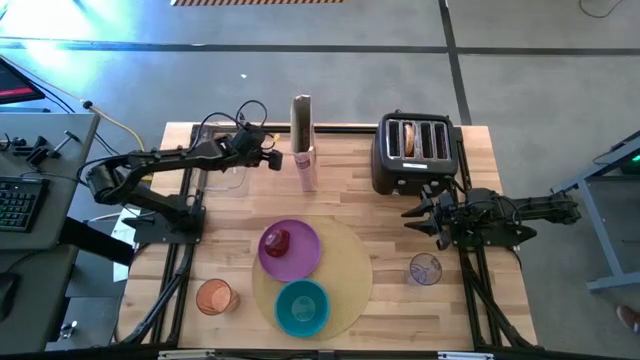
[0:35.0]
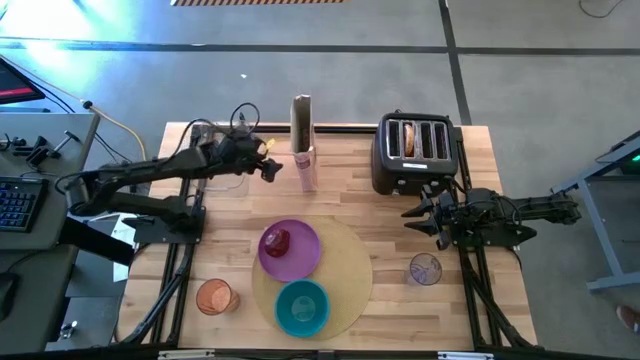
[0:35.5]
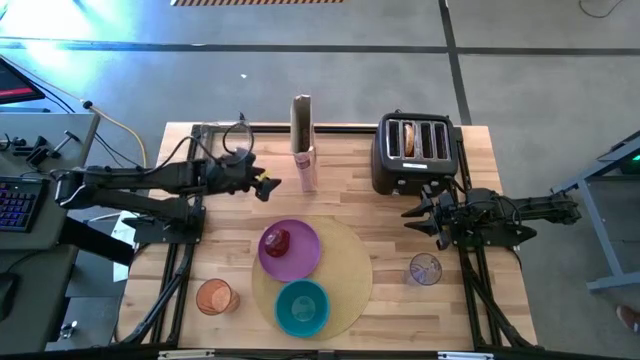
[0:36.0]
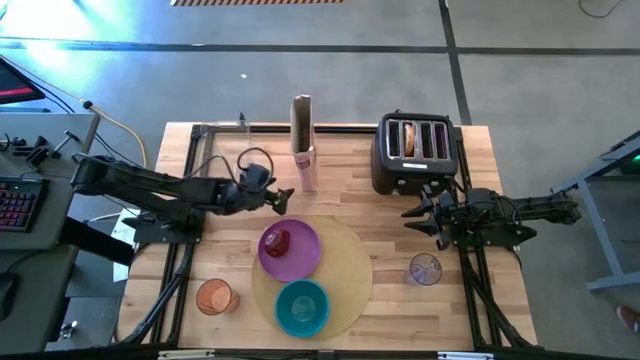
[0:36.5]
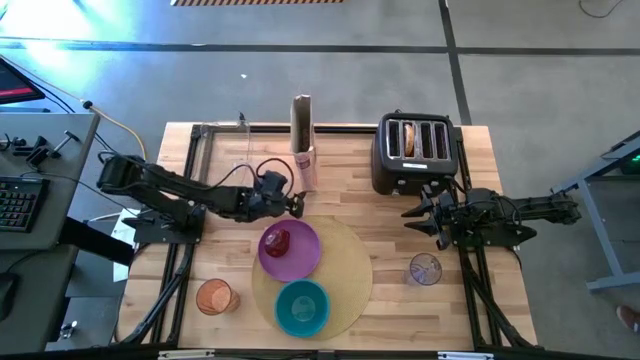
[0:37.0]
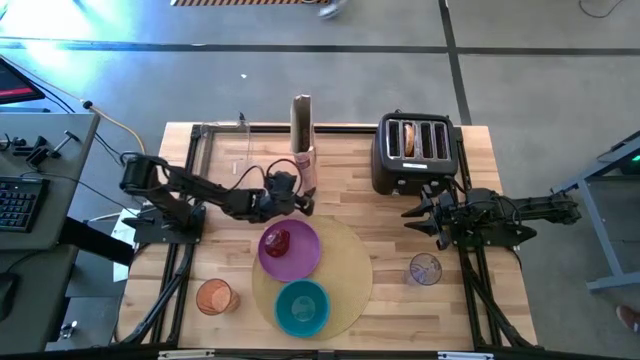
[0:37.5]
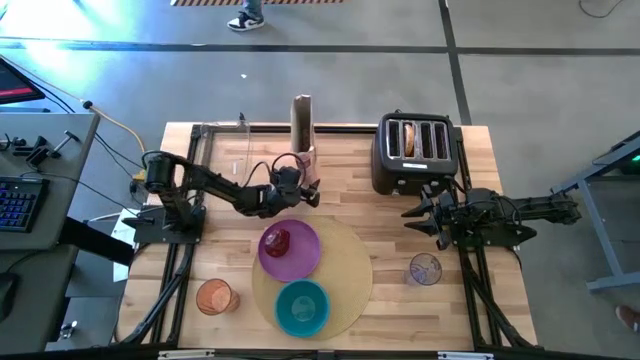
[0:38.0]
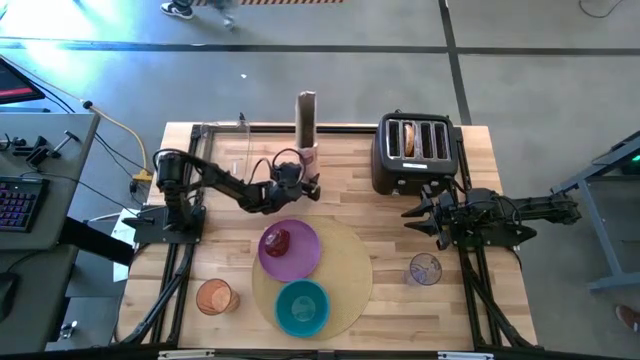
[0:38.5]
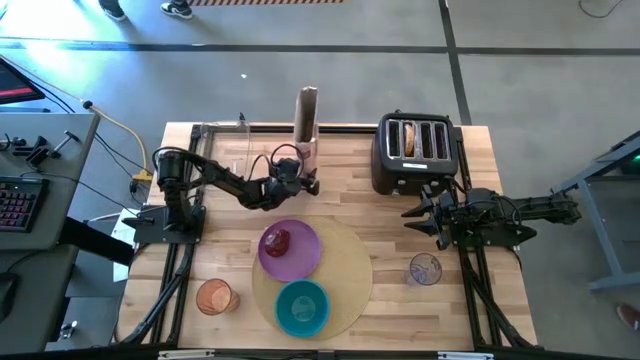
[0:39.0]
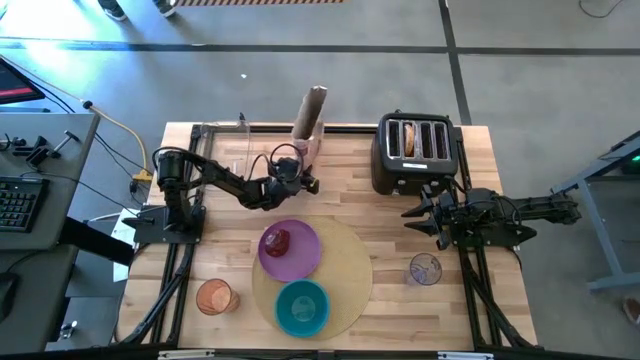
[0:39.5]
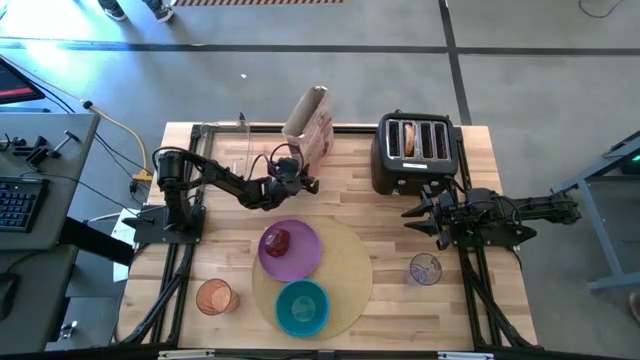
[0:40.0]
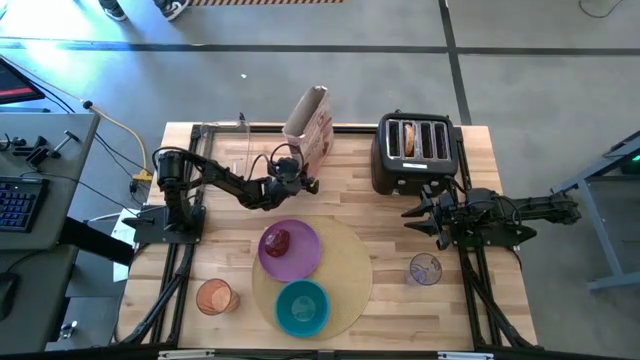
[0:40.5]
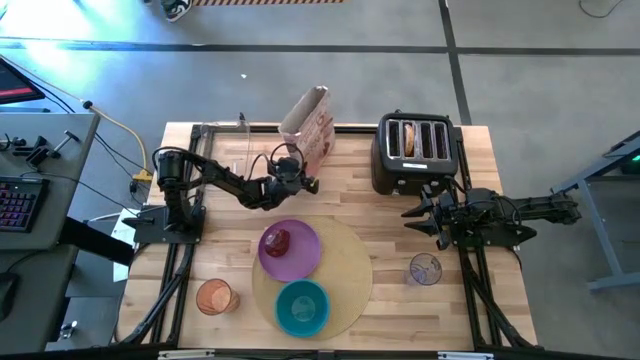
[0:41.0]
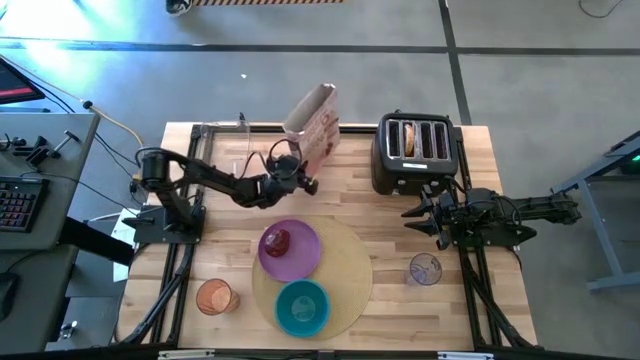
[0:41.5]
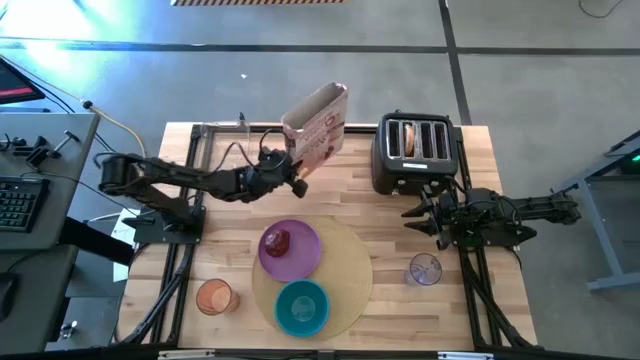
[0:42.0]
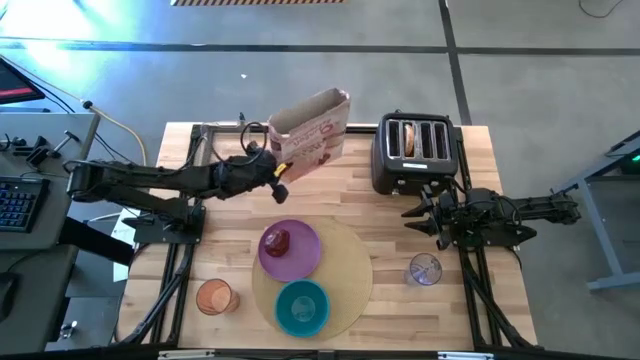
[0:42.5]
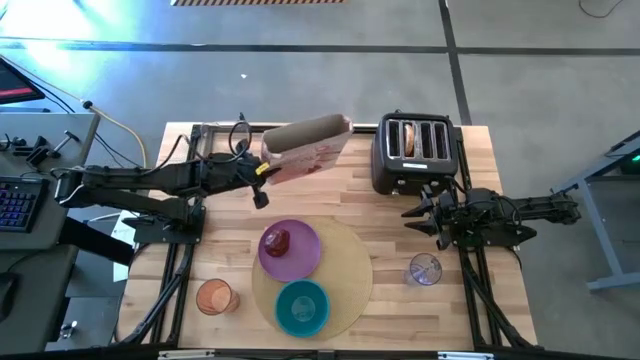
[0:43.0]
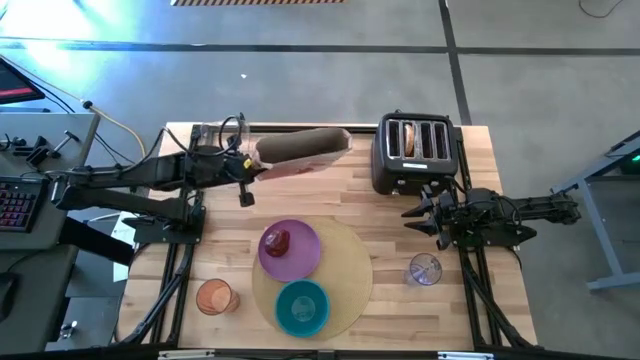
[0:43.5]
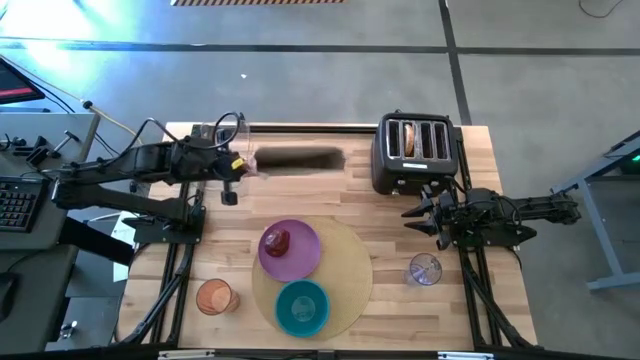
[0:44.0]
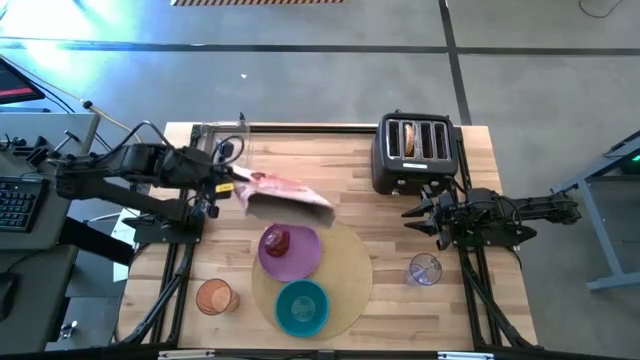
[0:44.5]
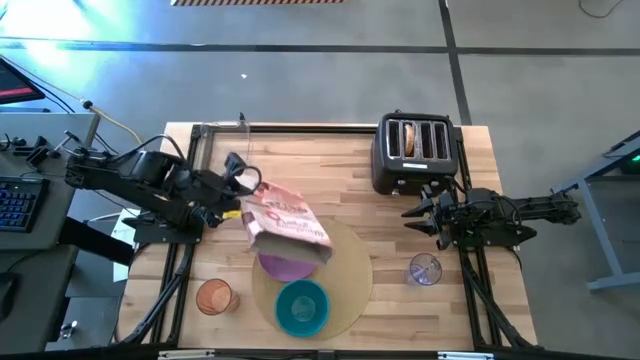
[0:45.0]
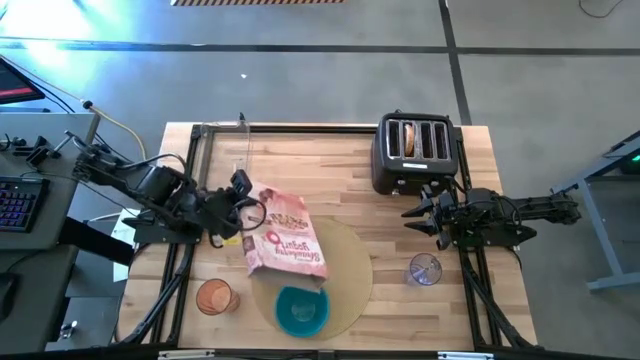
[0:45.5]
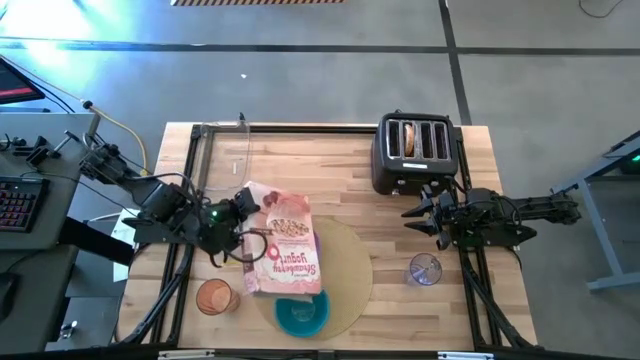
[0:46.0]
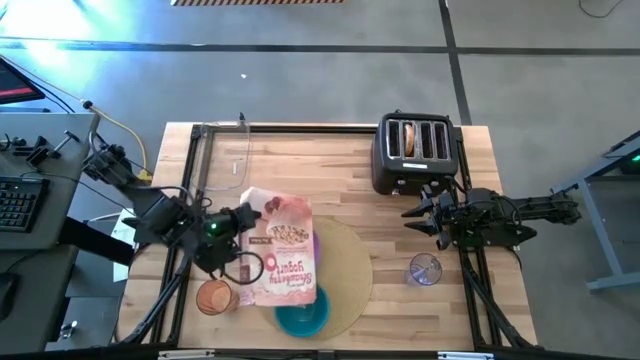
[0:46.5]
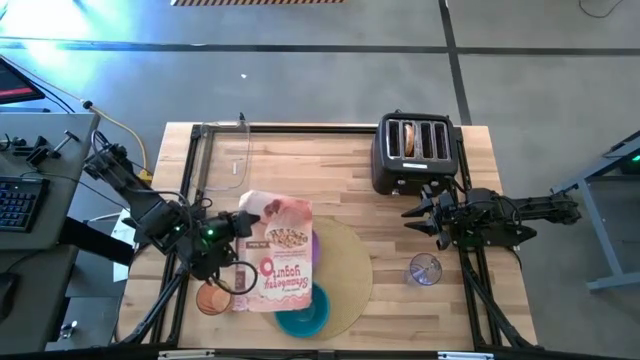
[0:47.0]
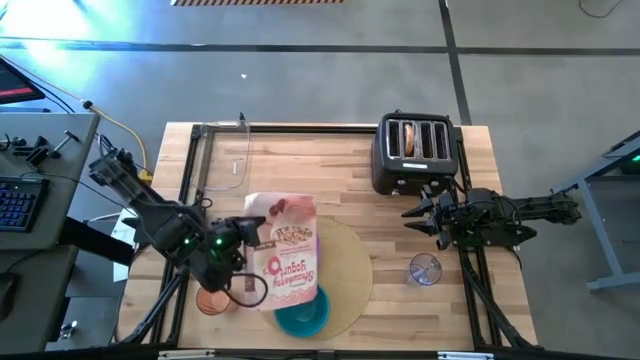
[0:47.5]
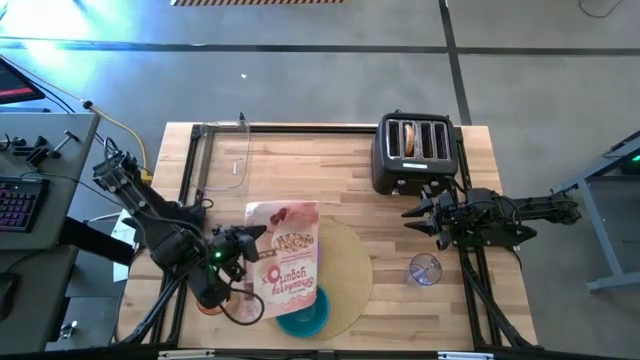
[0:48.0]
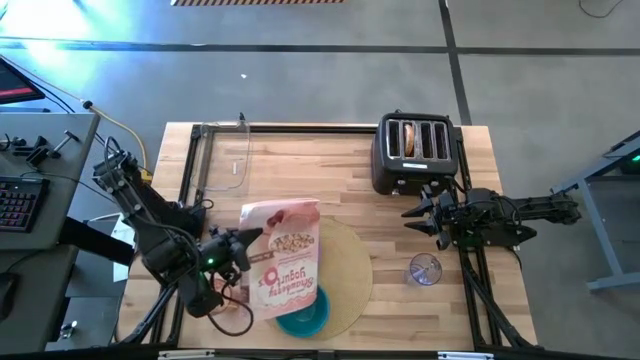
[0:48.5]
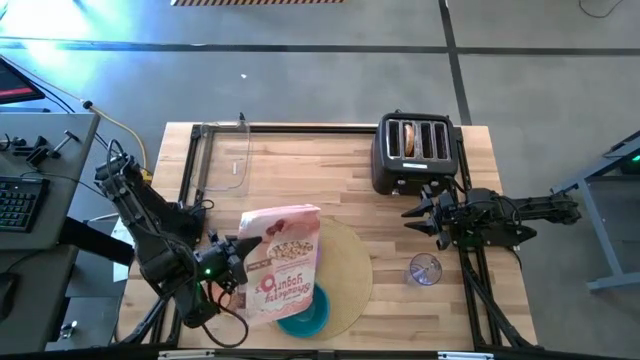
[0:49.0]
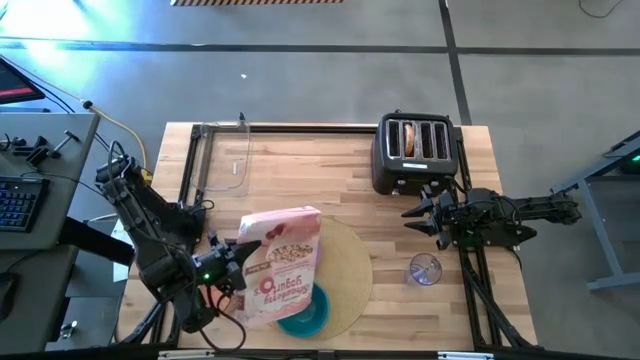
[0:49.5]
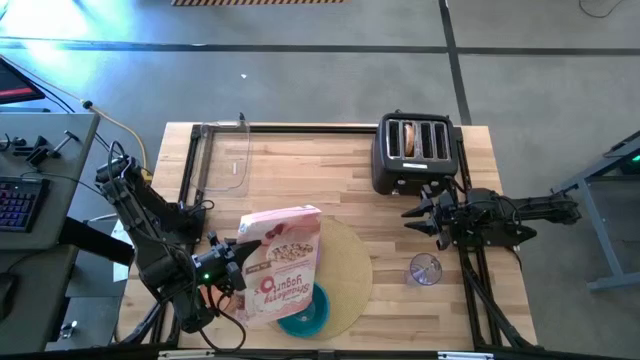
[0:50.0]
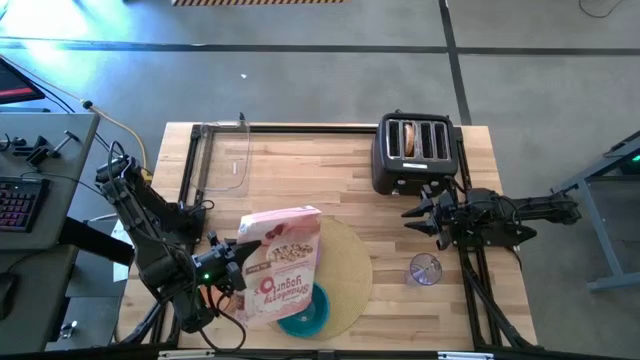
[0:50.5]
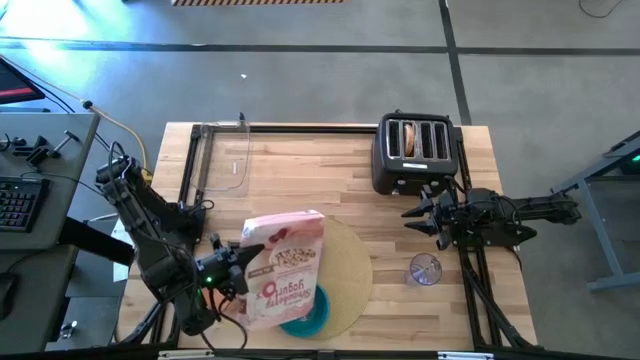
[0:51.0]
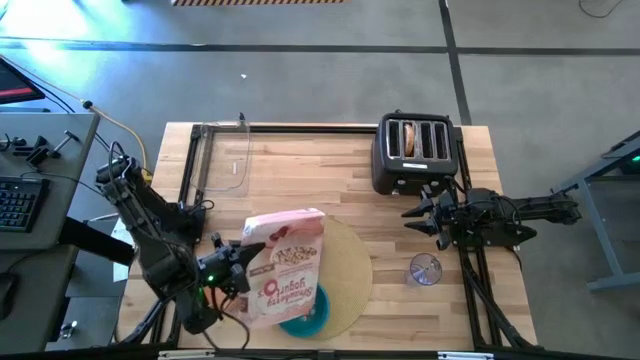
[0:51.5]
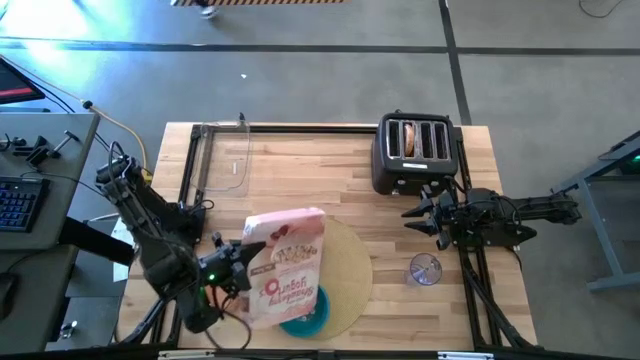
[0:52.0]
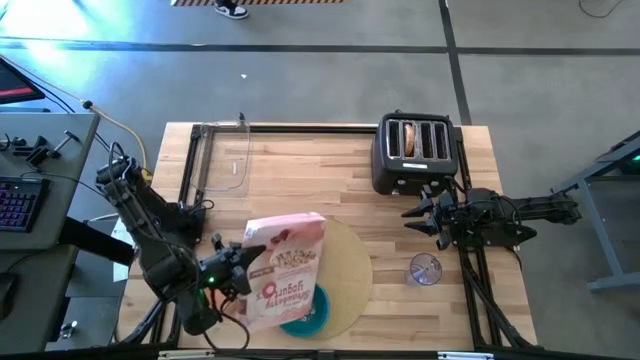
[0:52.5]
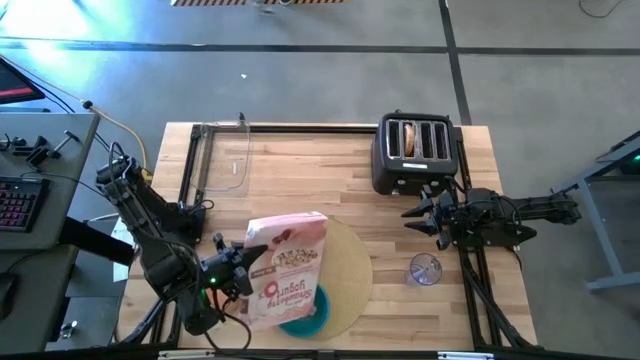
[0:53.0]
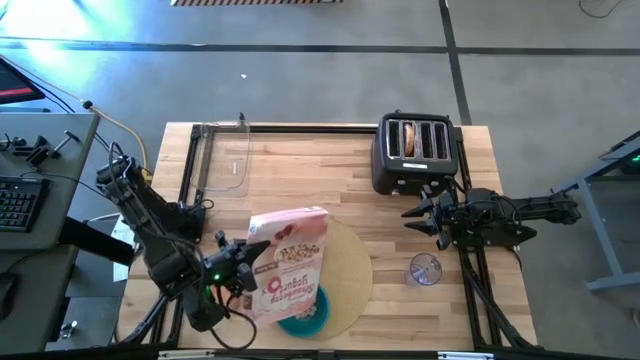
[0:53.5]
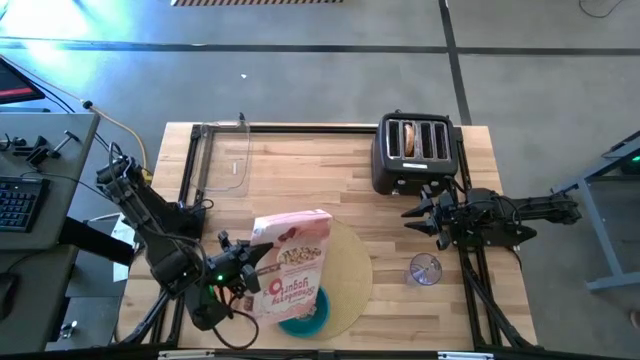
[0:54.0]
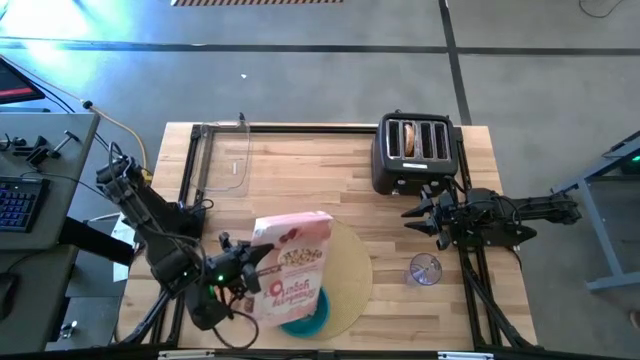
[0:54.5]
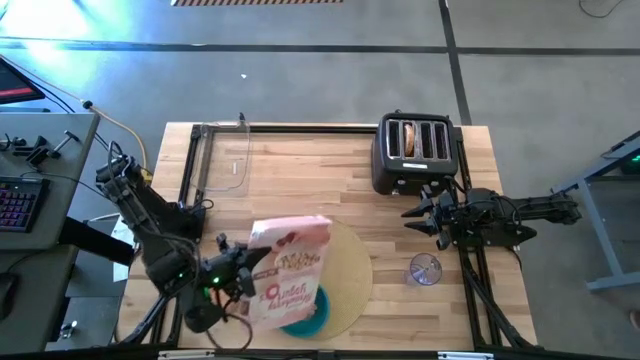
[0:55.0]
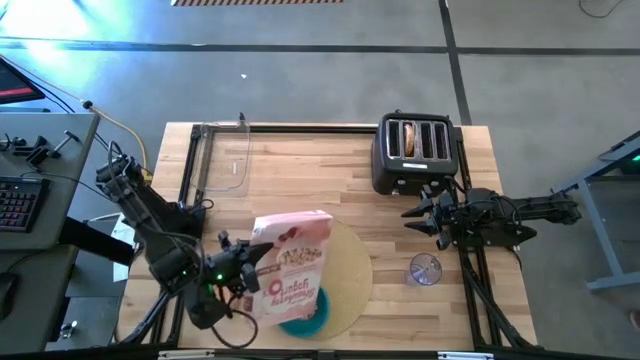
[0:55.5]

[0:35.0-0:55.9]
Task: Arrange a breakfast setting
Pour the cereal from the red cereal box into the blue bowl
